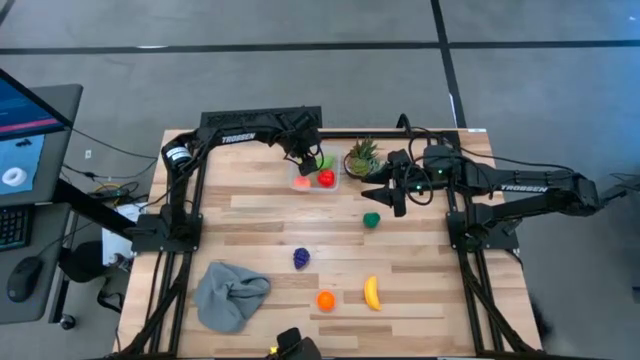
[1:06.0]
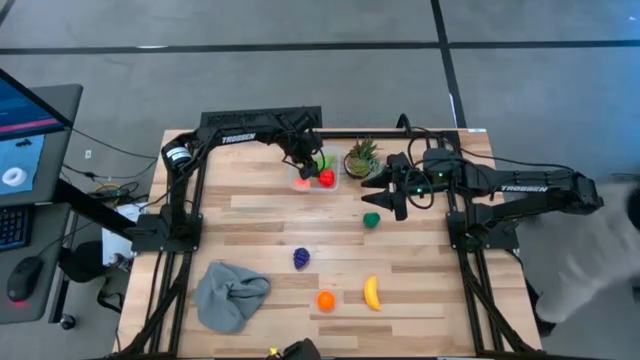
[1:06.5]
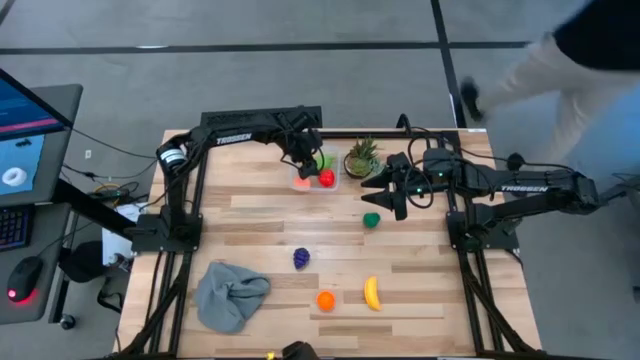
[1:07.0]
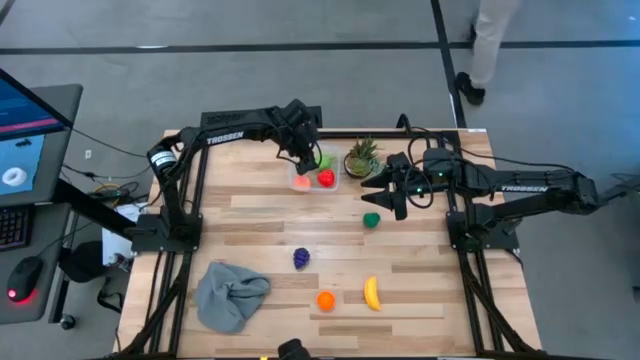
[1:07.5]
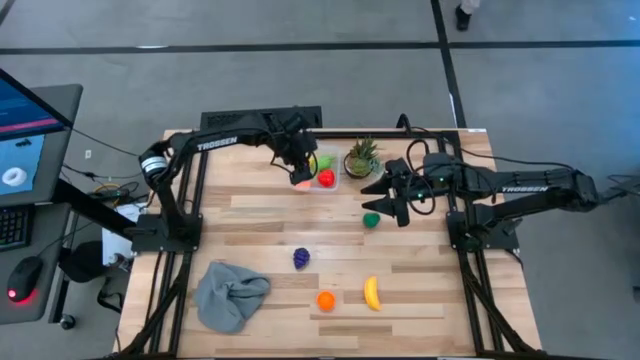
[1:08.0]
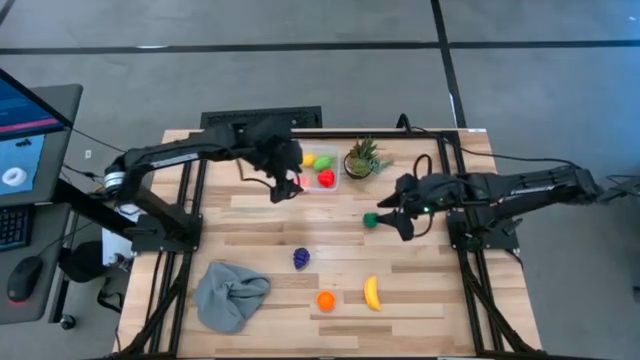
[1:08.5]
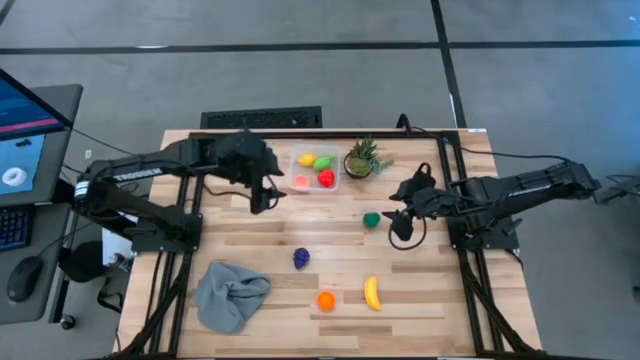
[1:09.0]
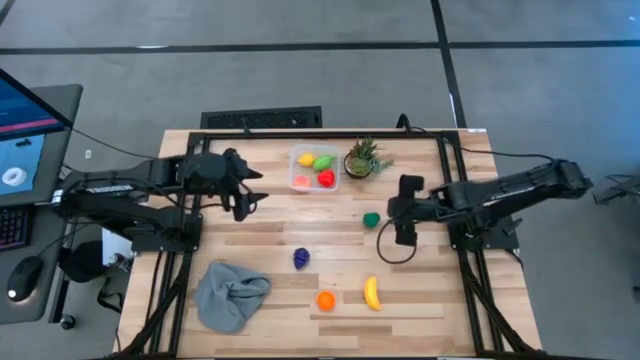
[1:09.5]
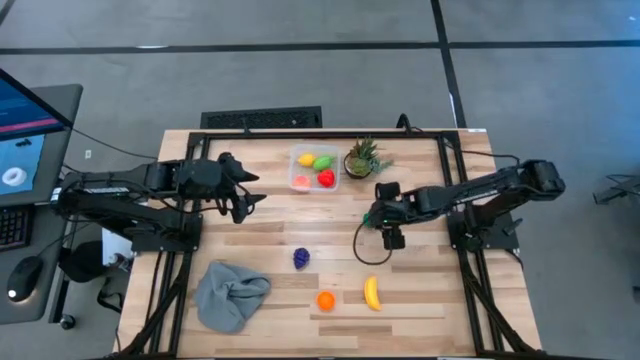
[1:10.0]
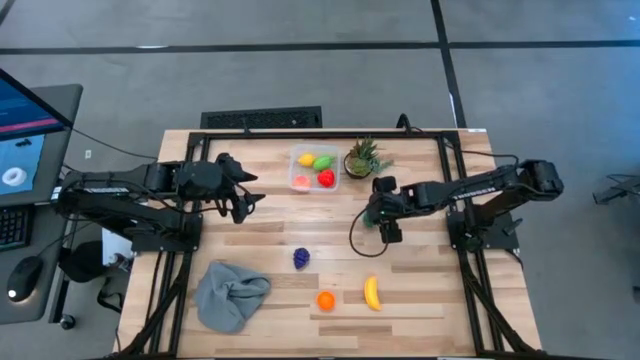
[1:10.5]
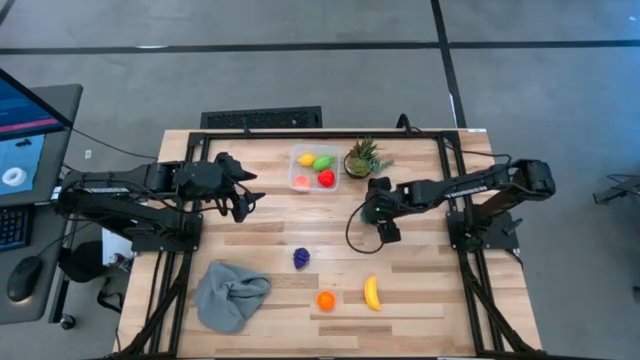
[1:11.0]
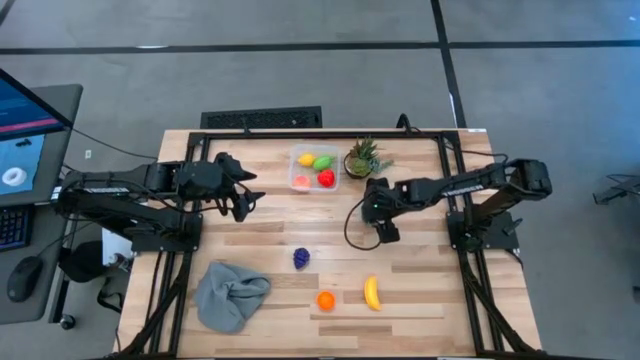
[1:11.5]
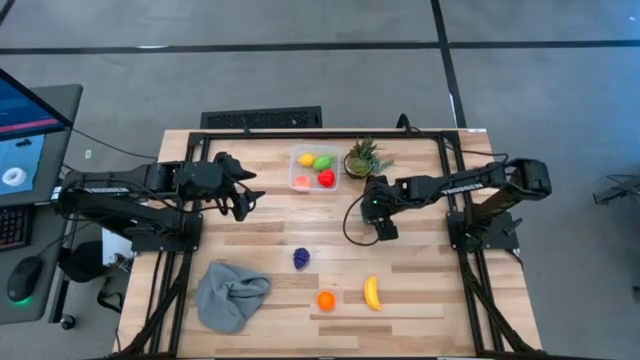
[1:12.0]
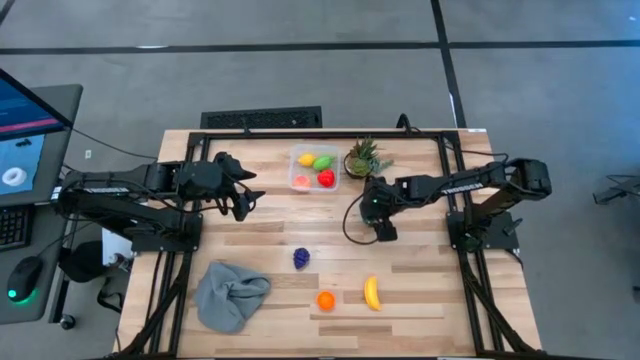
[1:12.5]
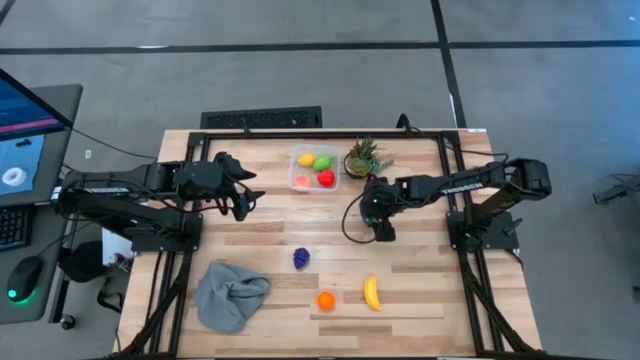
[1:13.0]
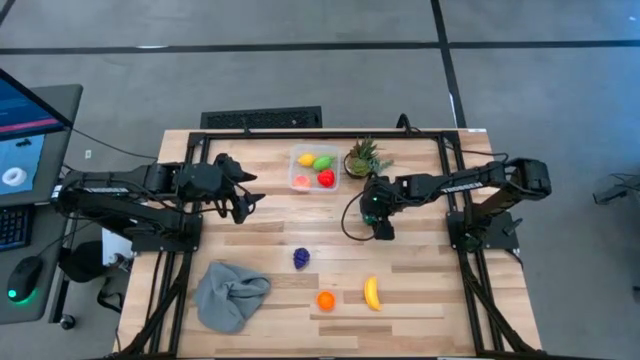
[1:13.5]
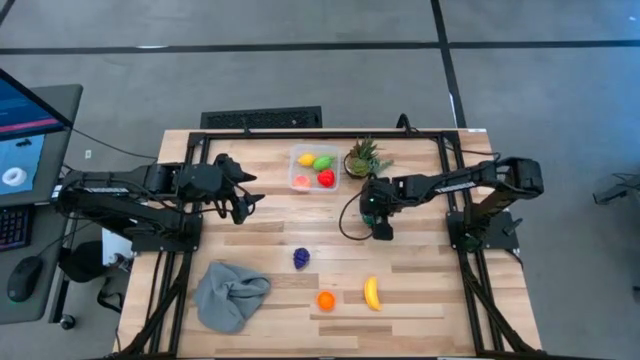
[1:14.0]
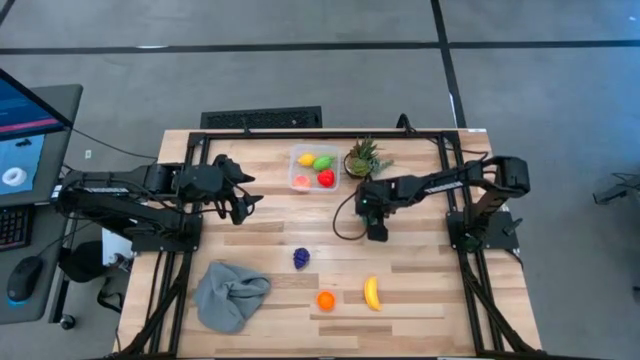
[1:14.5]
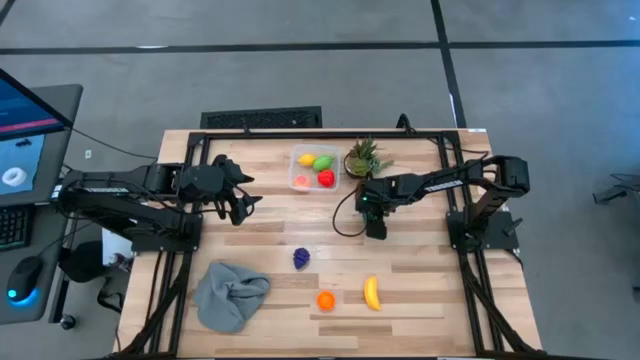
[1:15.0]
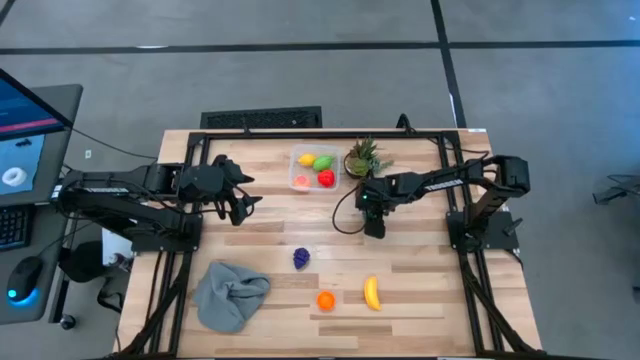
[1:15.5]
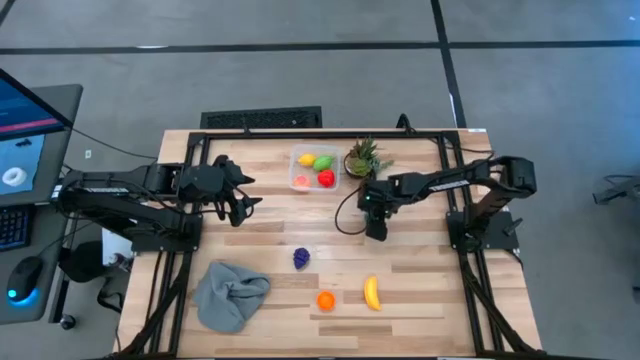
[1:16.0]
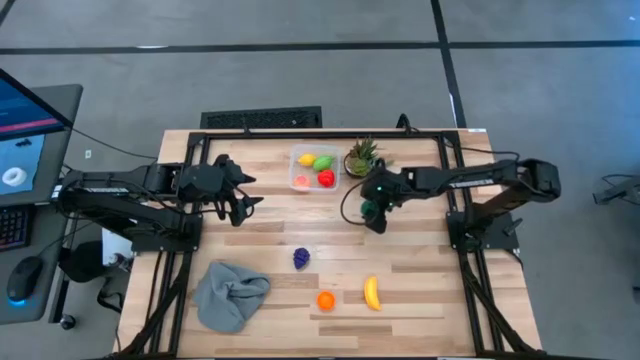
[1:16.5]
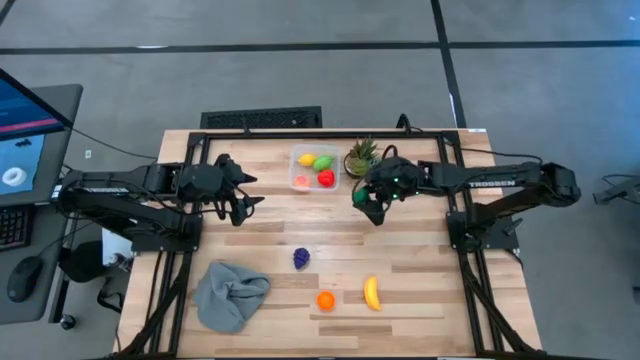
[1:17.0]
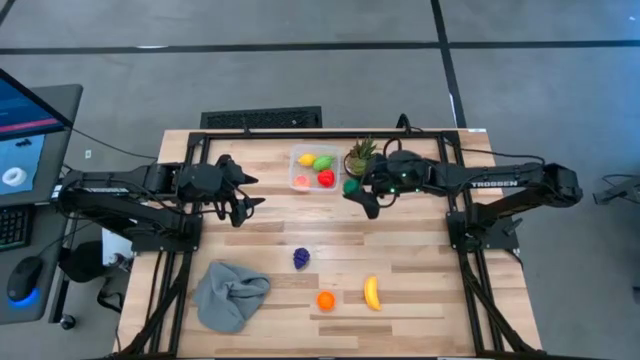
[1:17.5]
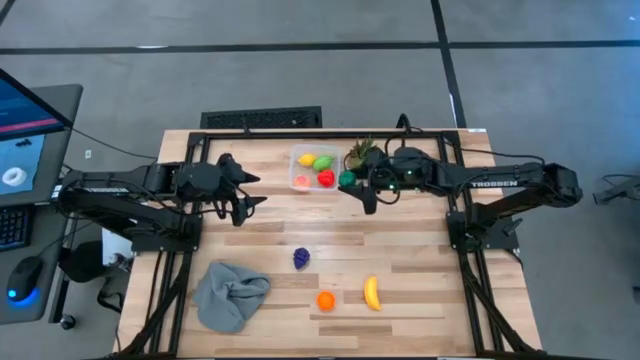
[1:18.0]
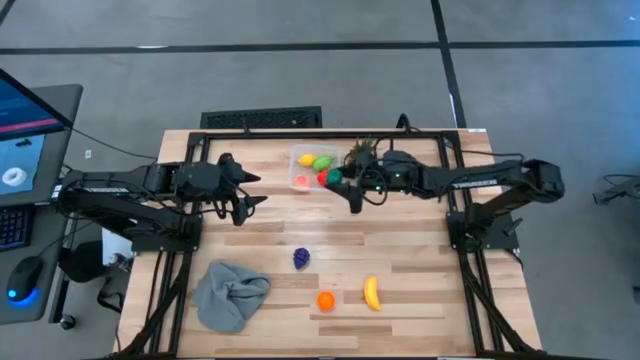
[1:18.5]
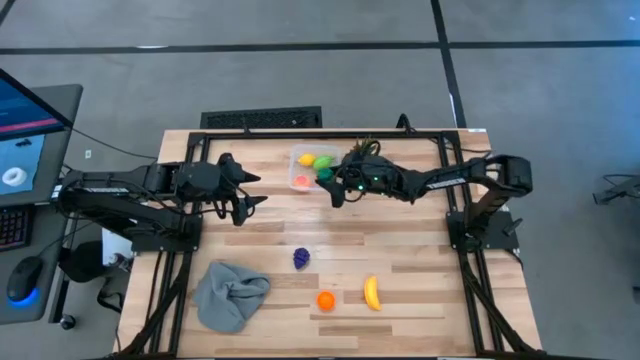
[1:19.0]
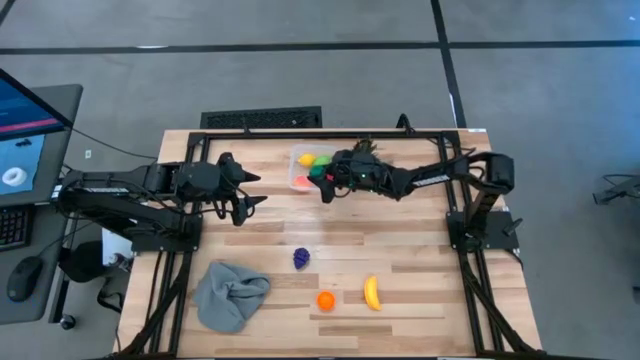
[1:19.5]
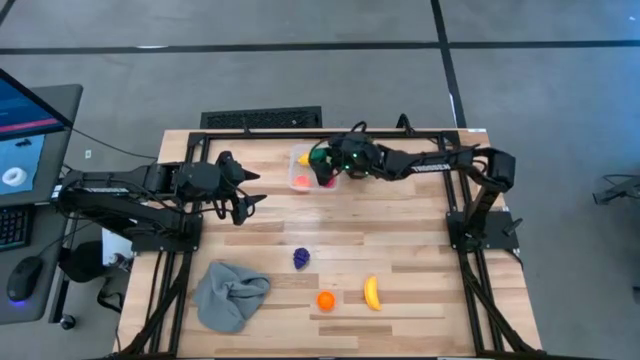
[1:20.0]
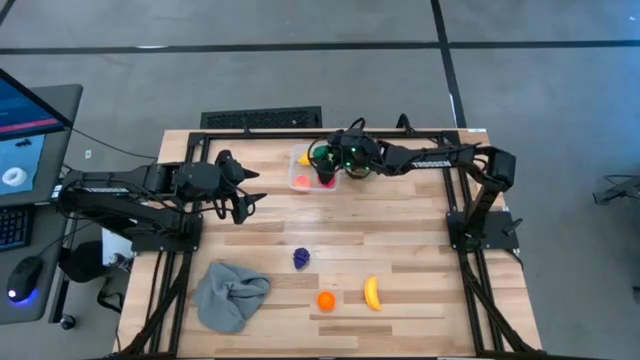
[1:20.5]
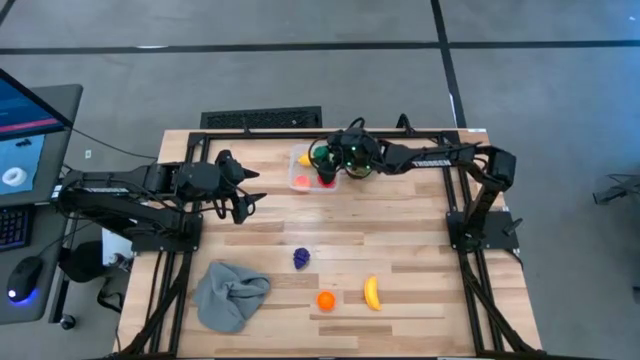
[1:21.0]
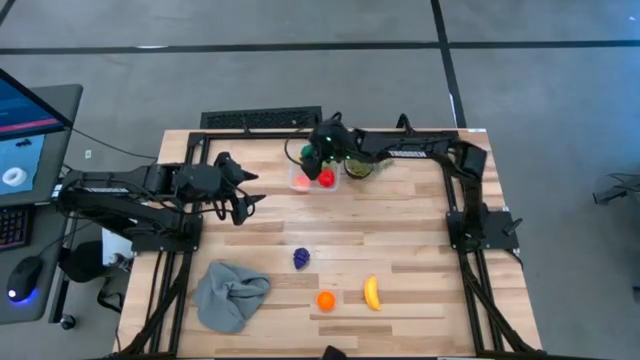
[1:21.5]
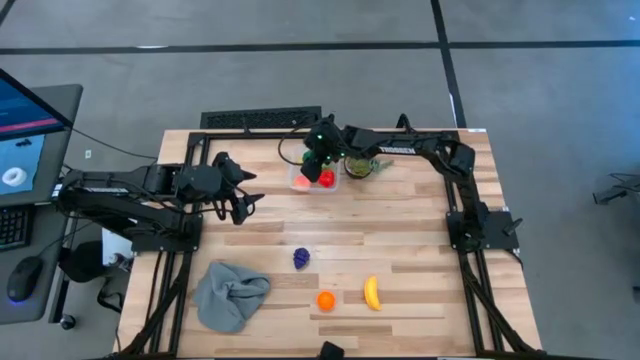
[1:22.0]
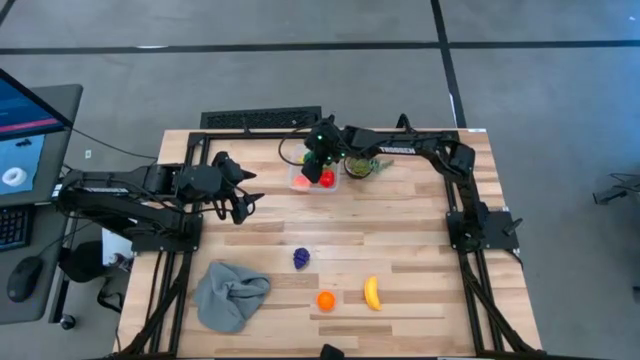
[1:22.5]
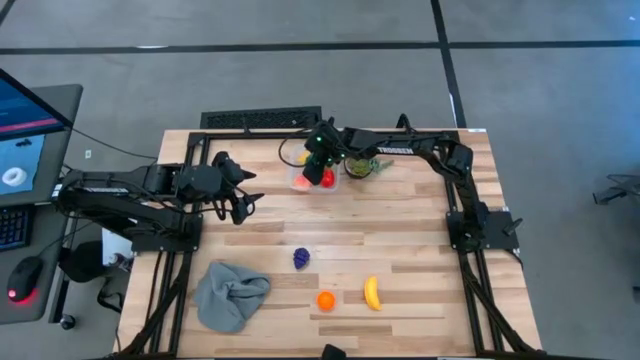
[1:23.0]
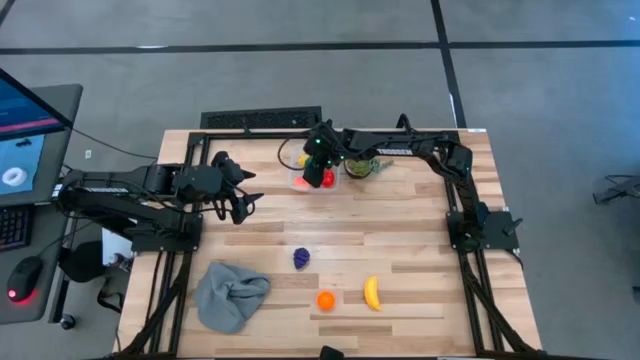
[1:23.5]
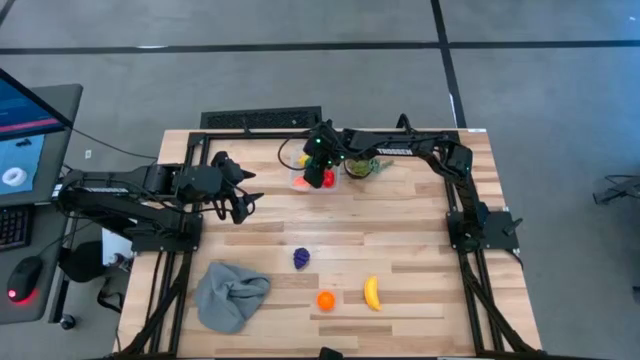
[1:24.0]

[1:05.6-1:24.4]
Task: Pick and placing Produce into tupperware
Put the green bell pepper into the transparent container

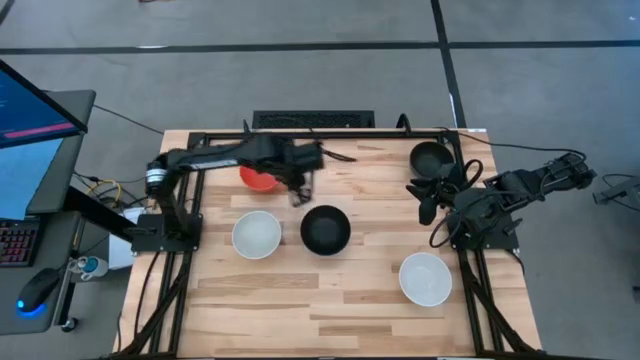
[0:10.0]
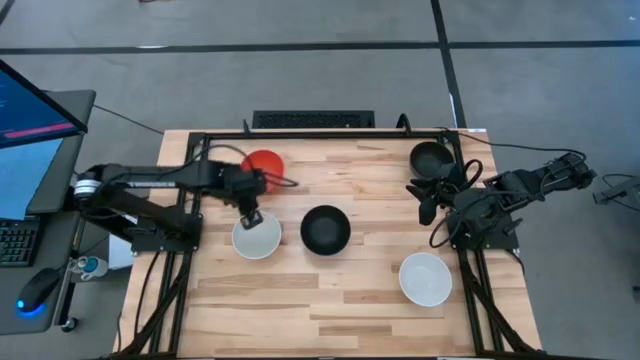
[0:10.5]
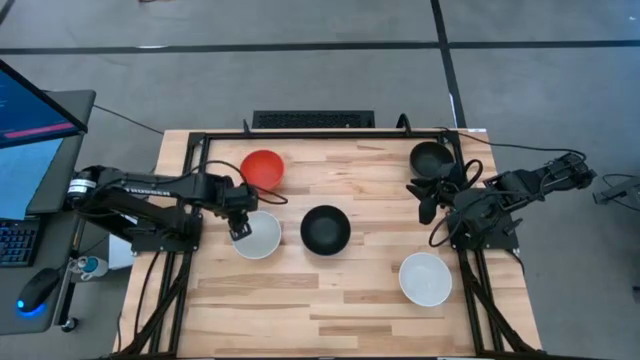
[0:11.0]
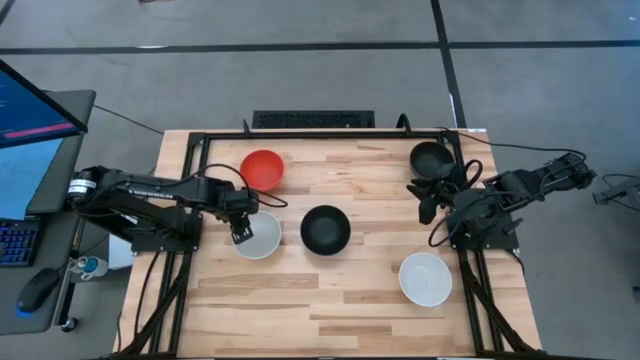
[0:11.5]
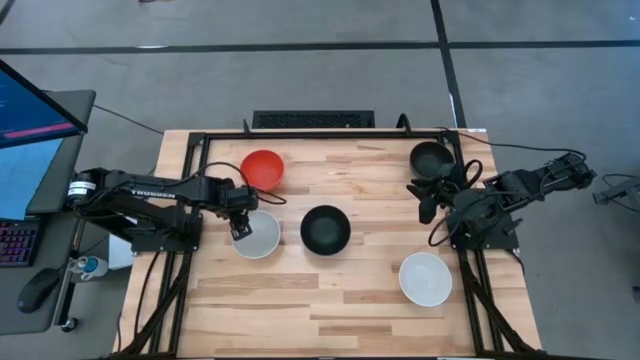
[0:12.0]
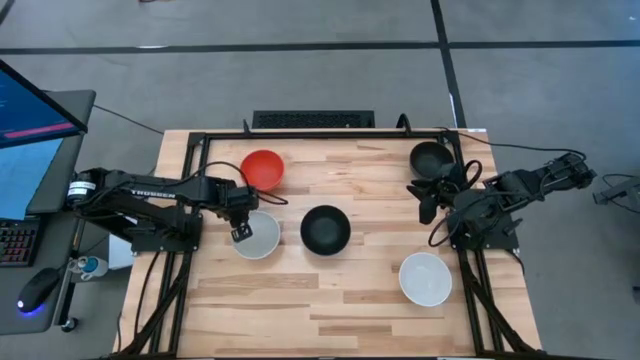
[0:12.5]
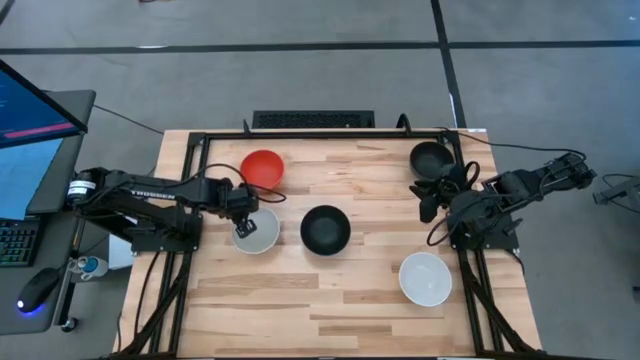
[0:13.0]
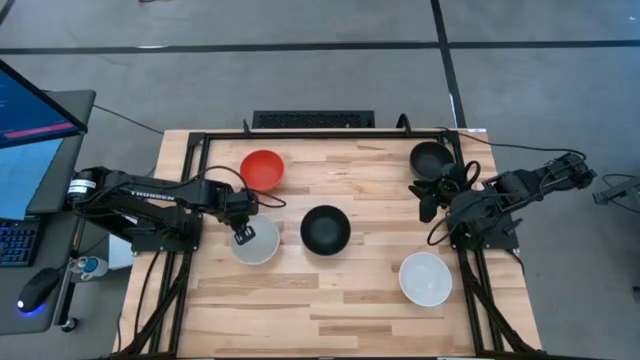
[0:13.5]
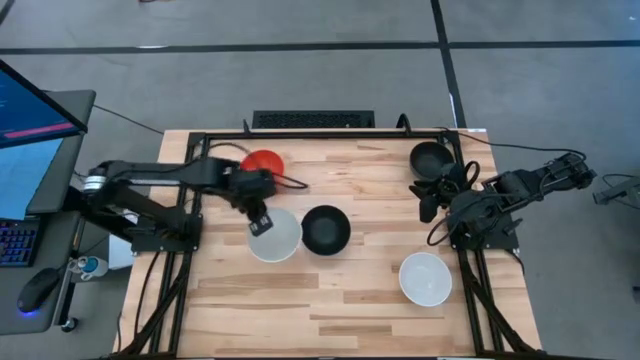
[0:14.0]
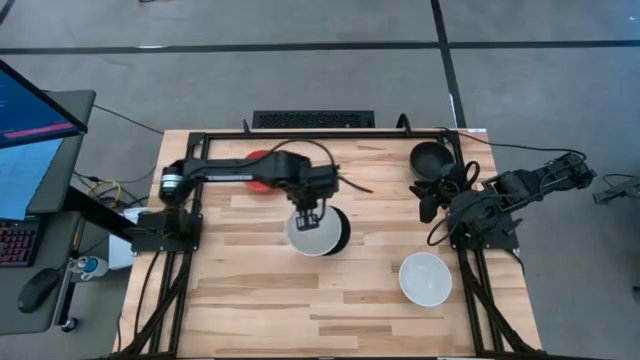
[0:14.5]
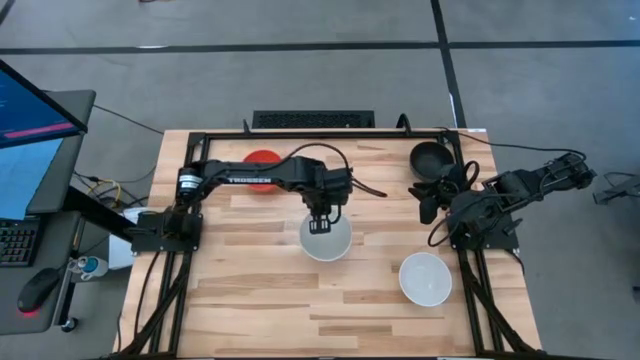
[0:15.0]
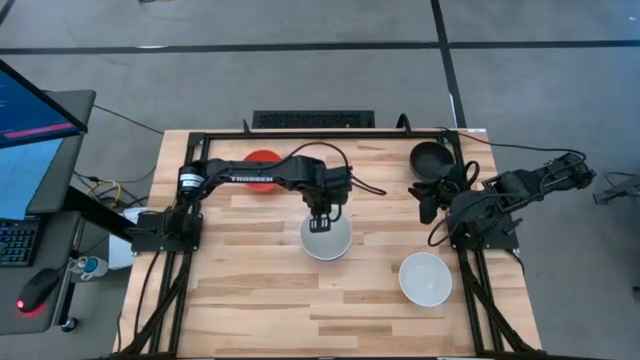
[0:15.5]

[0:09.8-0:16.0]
Task: Nest bowls inside each other
Stack the left white bowl on top of the black bowl
